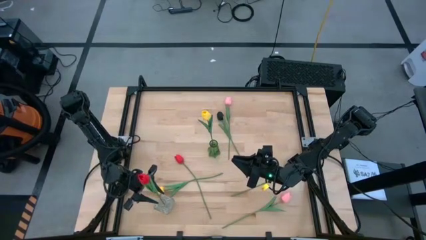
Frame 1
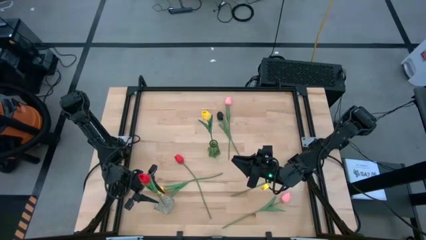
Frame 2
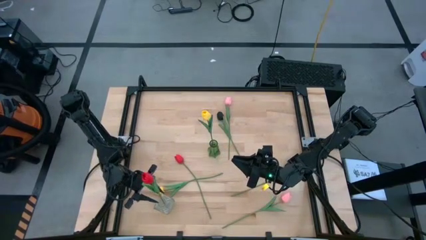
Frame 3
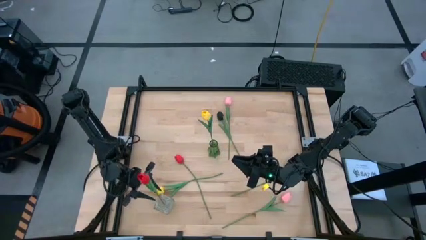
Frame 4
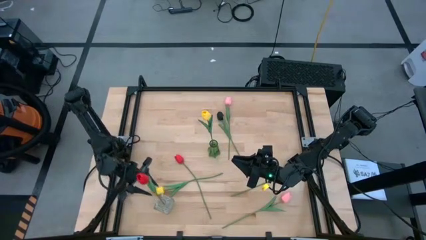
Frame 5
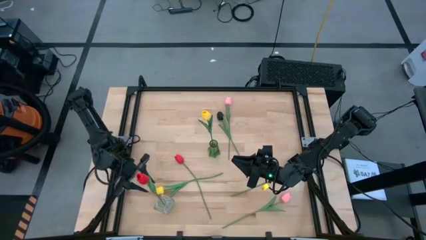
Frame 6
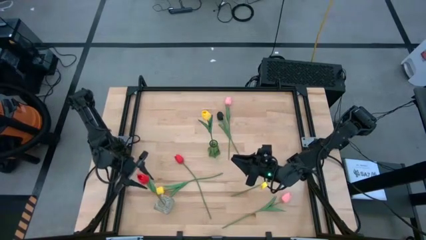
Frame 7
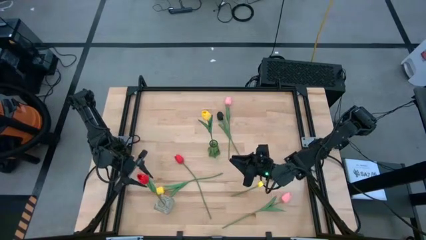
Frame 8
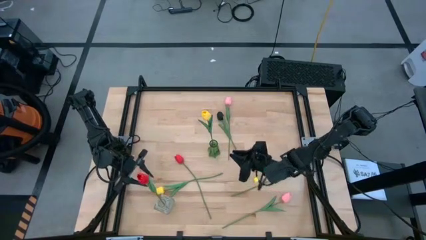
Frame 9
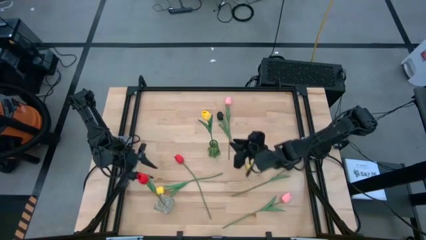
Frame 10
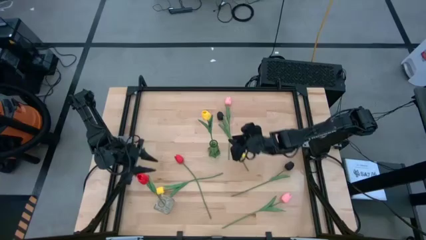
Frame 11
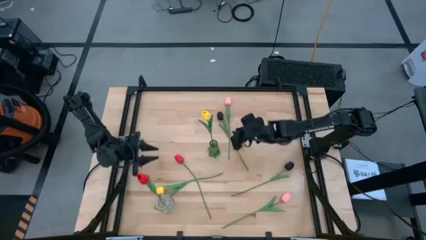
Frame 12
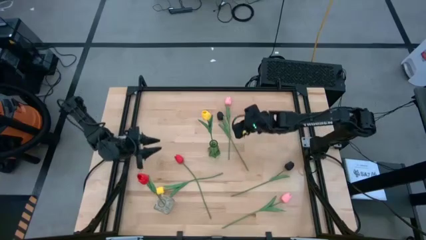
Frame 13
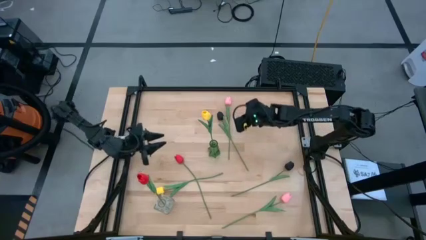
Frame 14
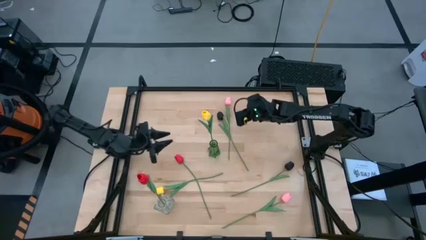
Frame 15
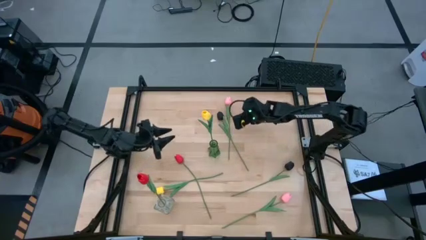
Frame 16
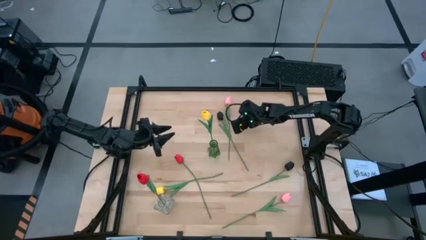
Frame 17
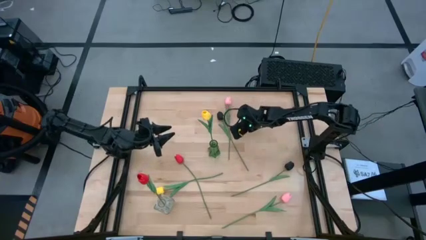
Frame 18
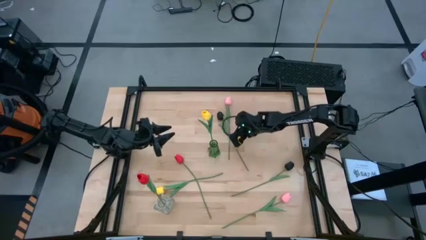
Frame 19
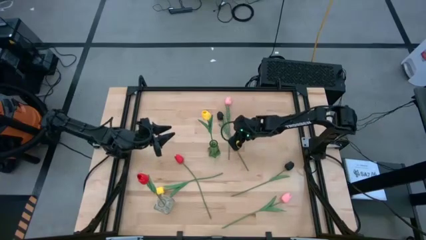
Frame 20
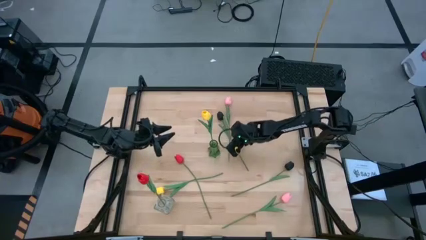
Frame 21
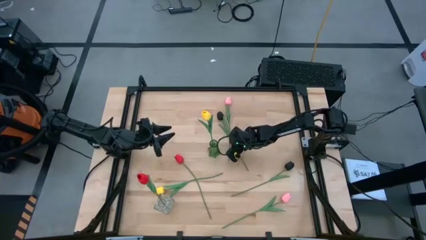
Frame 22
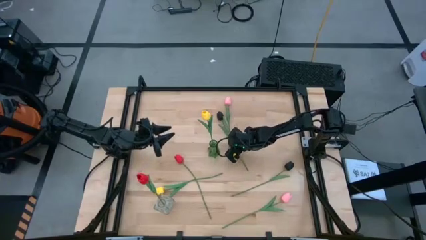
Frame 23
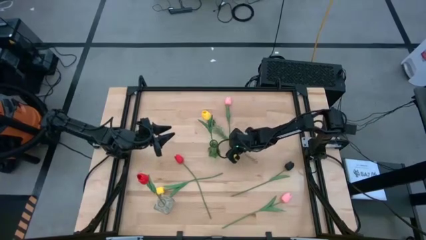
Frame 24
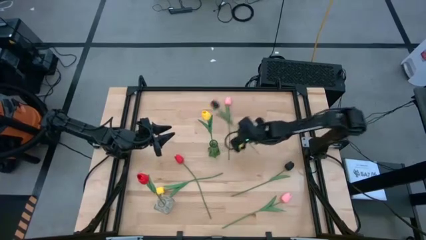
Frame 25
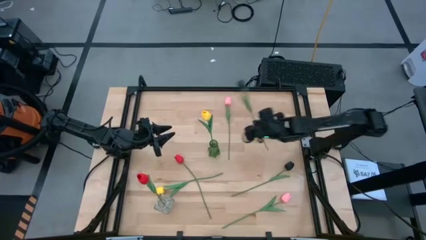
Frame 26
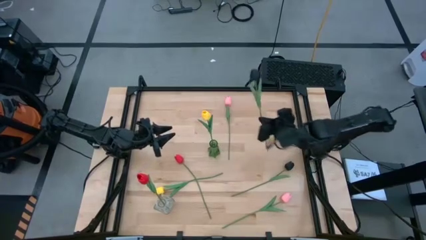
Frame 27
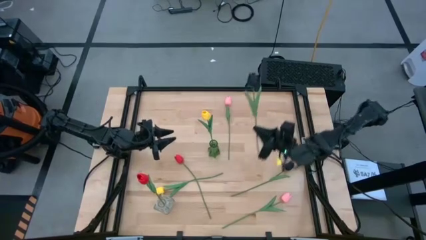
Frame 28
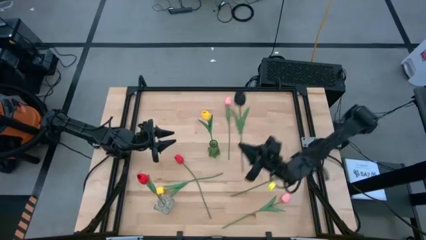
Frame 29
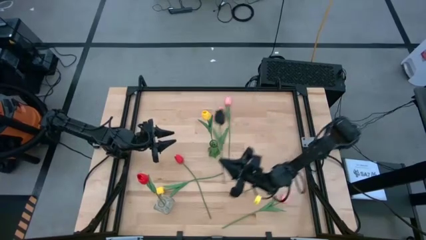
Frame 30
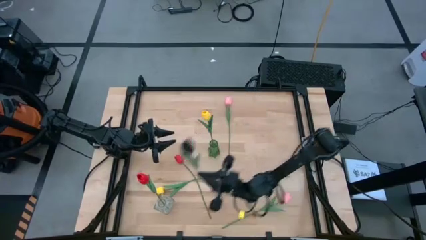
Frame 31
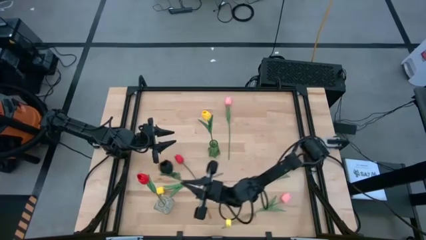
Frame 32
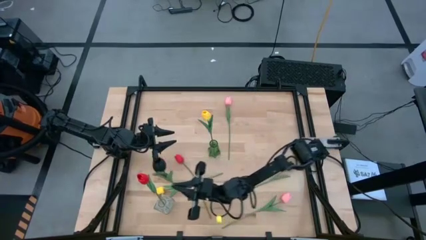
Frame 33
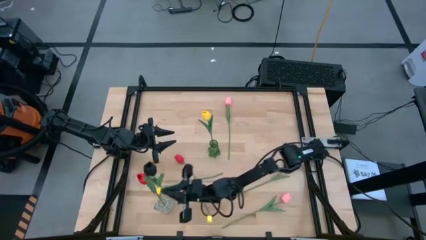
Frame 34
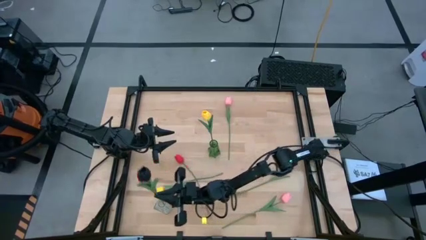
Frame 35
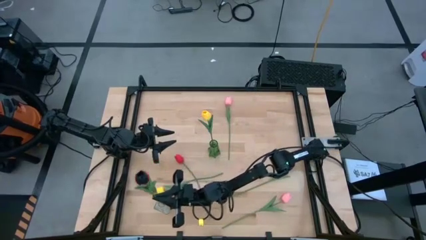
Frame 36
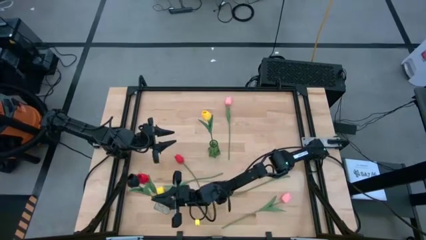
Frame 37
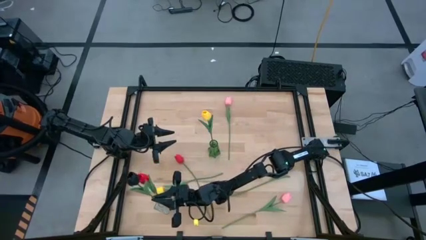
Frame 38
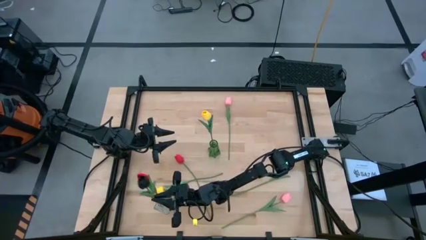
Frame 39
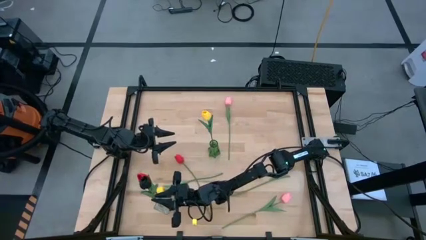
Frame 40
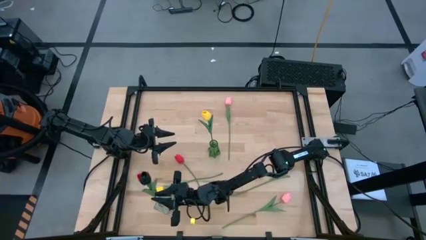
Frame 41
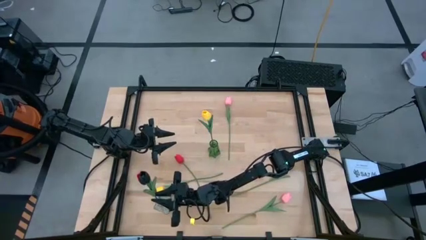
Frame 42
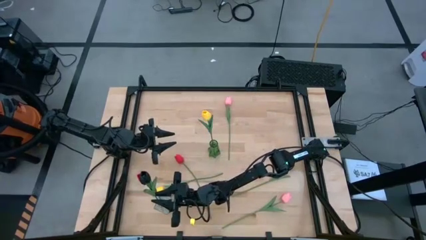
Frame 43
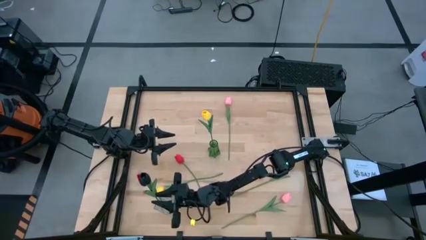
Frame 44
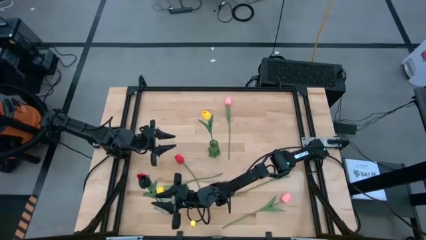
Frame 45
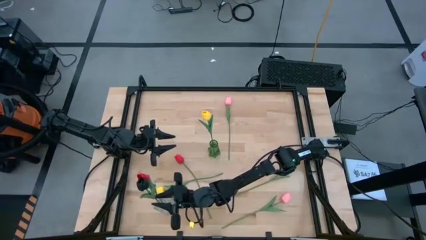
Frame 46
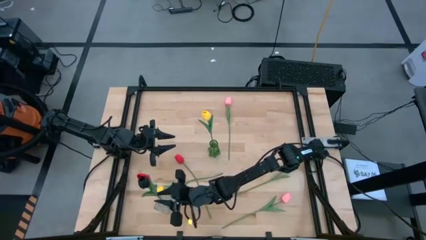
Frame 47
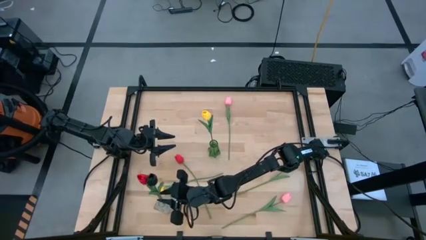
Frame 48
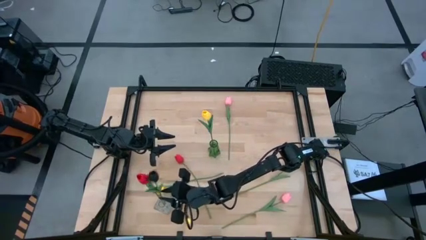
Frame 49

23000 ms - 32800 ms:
Task: Sort flowers into vase by color
Put the top black tulip into the transparent vase

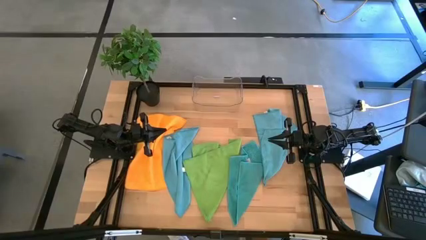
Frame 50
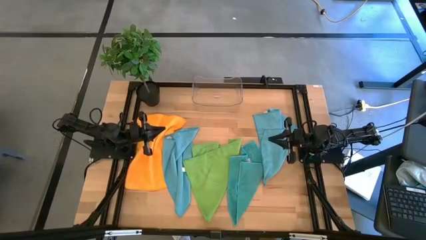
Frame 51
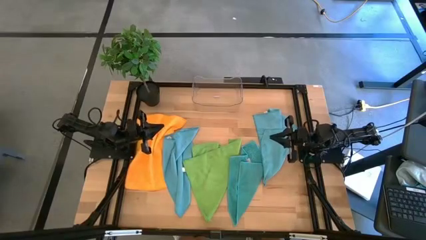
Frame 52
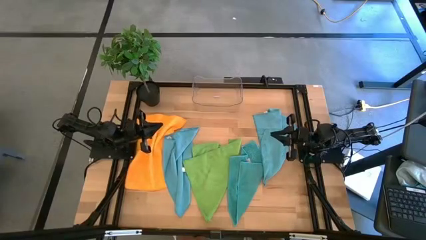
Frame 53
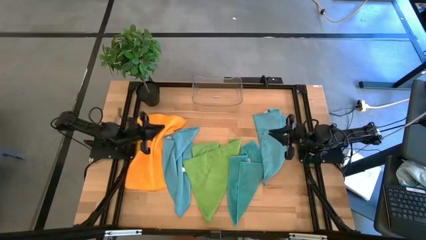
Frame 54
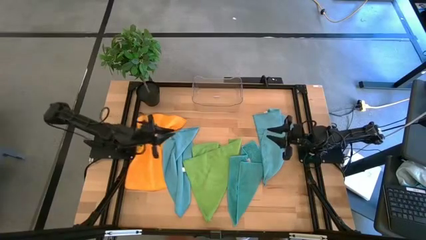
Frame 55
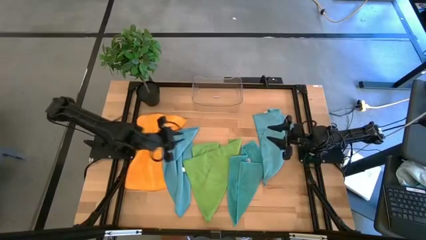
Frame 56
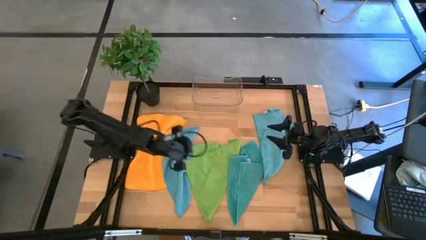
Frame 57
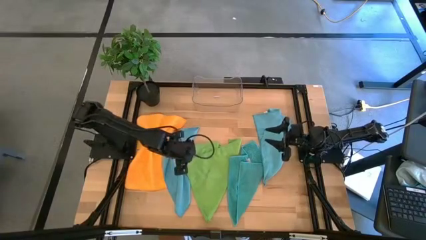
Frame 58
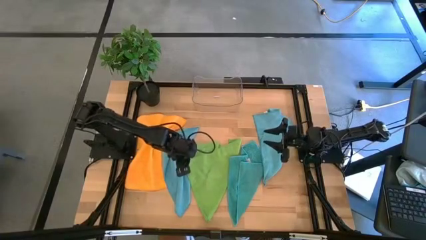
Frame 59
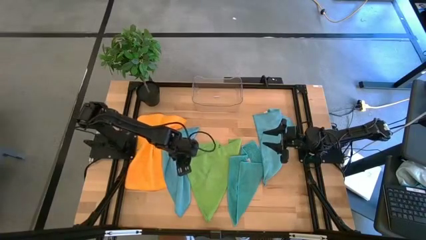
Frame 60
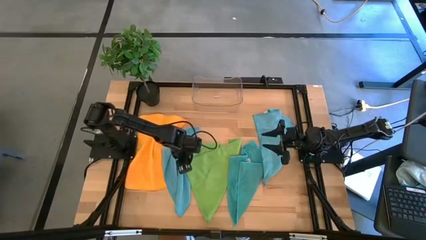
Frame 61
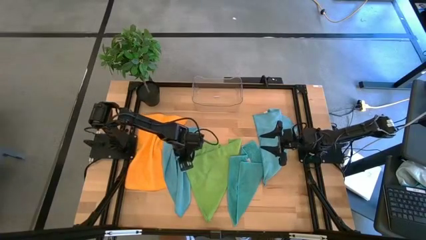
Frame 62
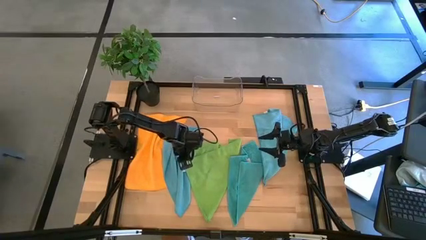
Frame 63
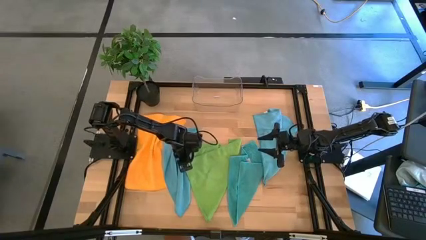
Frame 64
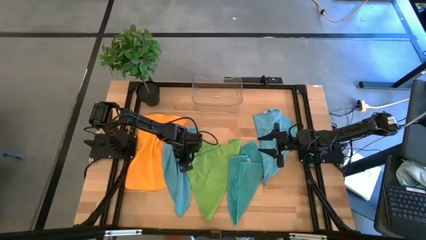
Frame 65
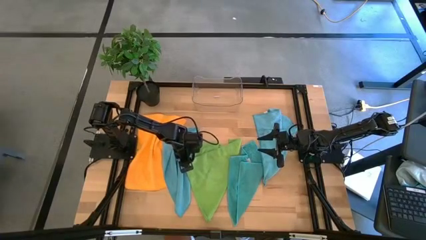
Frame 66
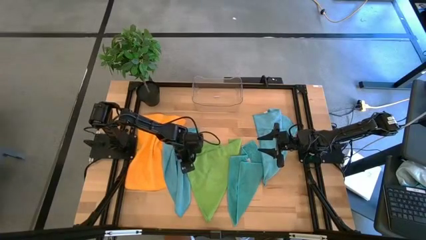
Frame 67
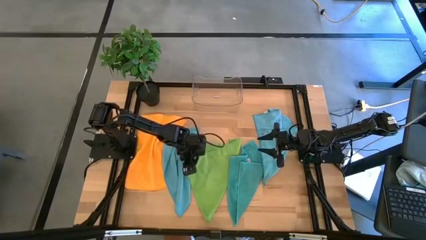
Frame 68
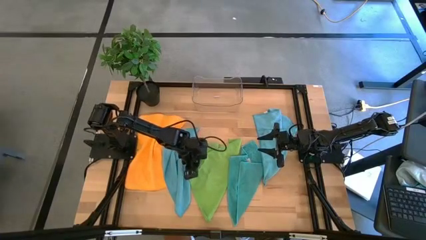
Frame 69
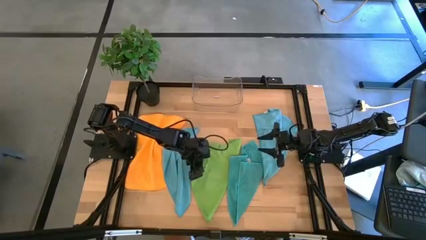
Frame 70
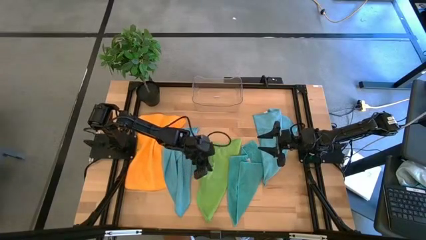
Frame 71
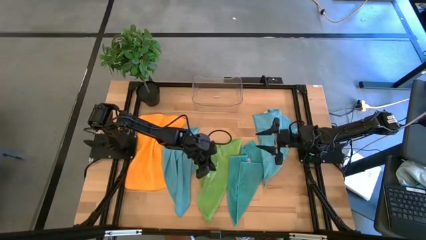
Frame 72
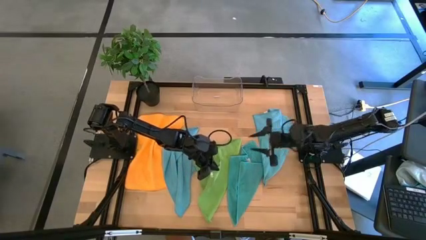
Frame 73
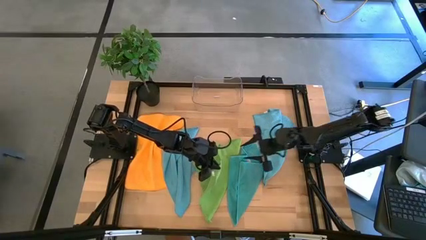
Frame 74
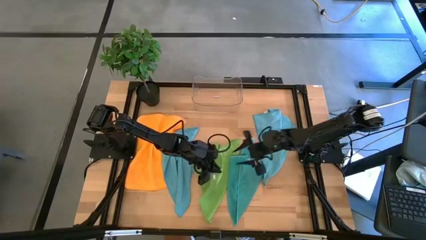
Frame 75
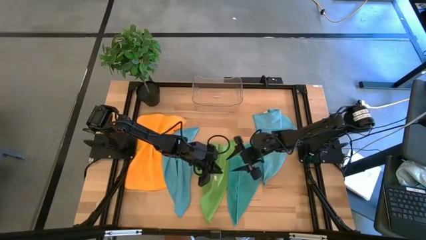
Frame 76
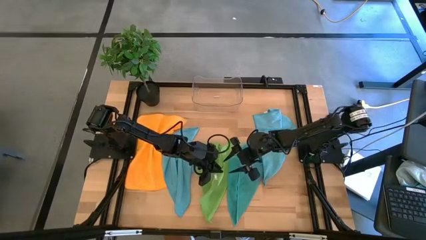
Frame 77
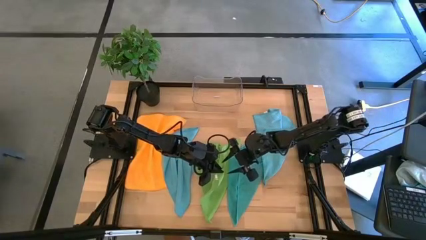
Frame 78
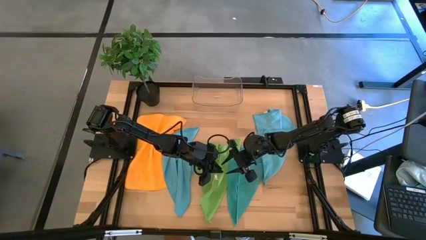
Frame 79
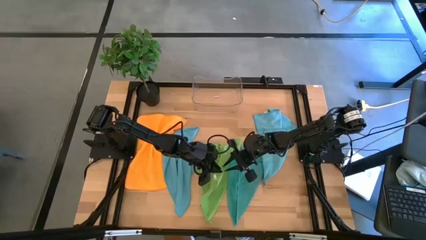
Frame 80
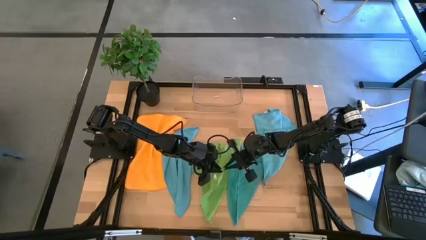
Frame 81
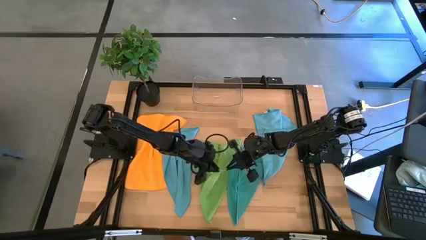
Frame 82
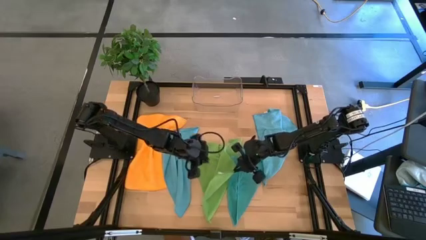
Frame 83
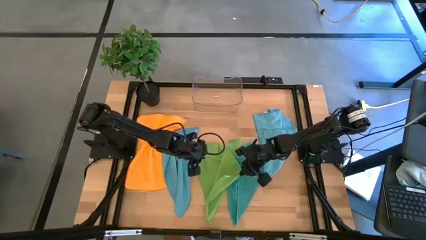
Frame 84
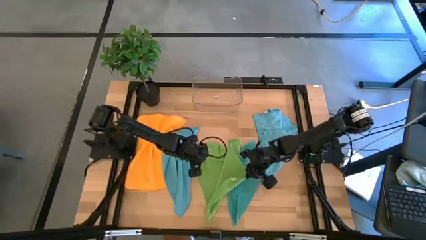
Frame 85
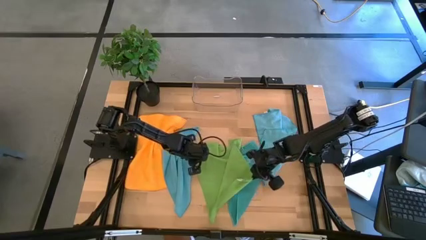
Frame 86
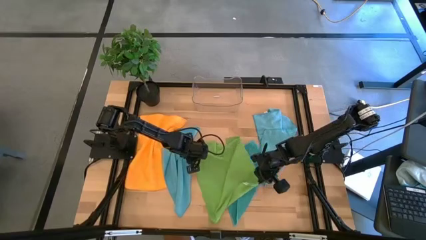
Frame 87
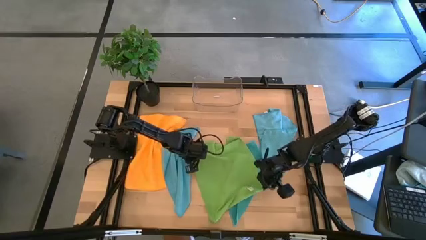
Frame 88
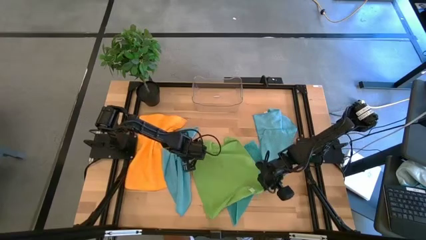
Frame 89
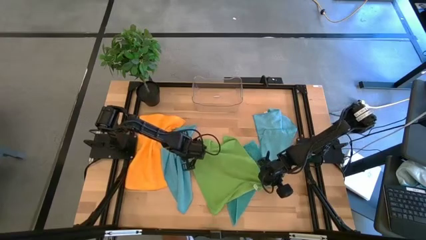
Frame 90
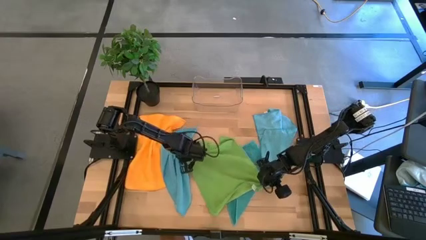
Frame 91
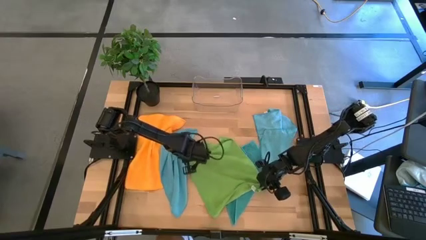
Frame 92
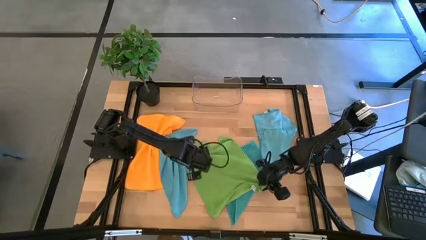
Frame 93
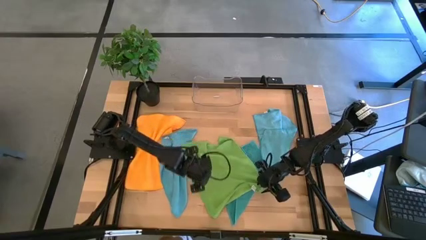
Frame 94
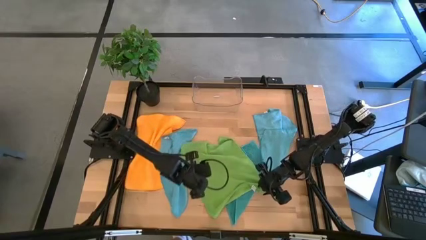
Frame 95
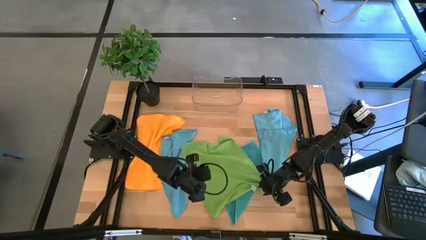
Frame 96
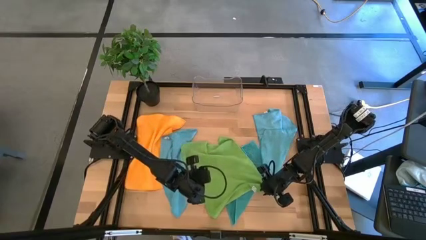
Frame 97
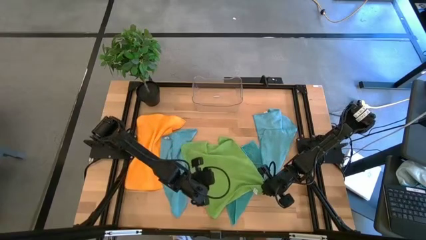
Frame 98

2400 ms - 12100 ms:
Task: Fold microfiber towels
Fold the green microfiber towel
